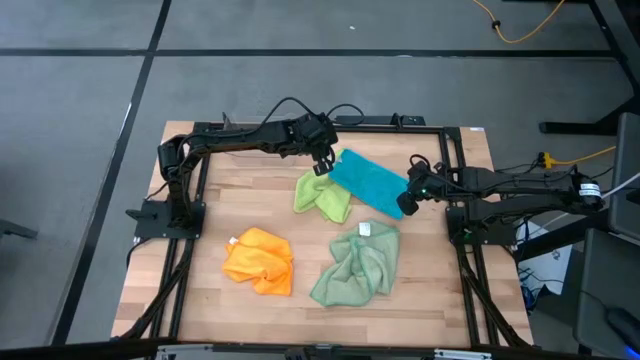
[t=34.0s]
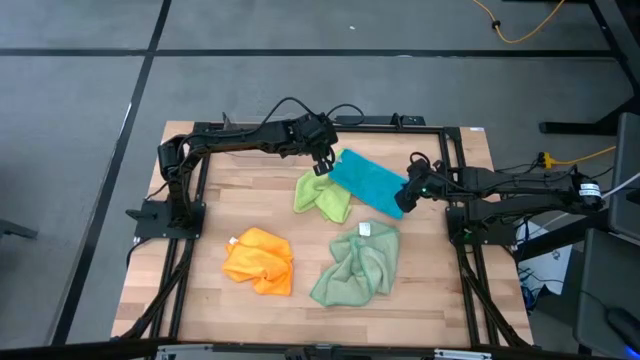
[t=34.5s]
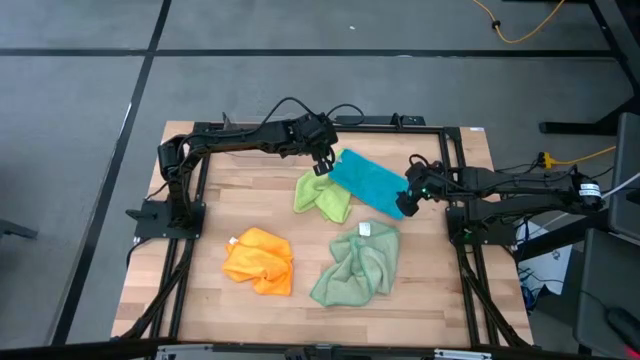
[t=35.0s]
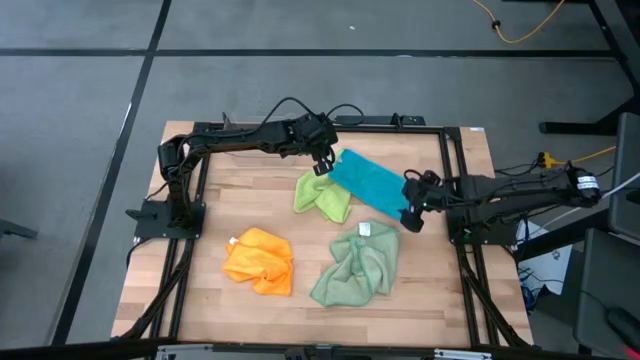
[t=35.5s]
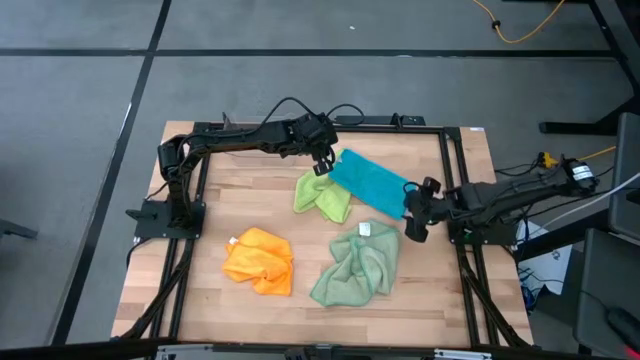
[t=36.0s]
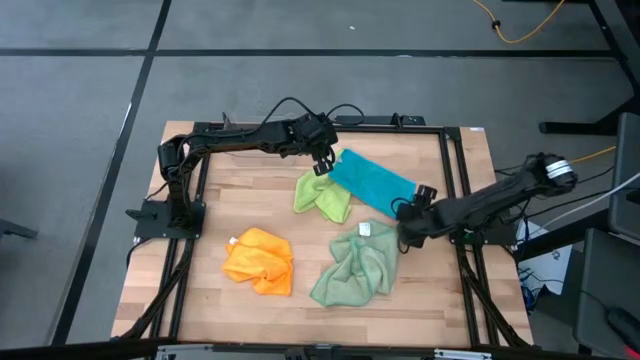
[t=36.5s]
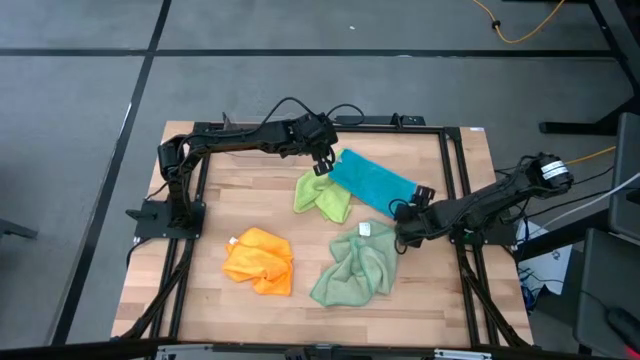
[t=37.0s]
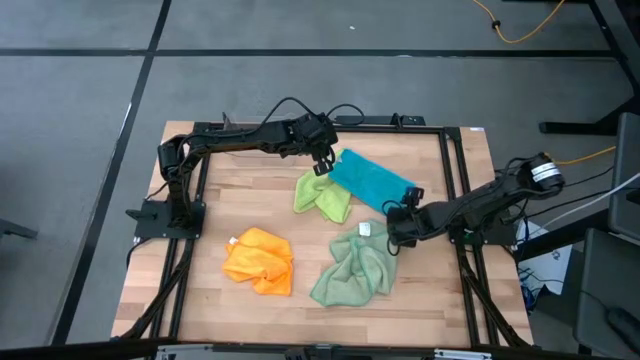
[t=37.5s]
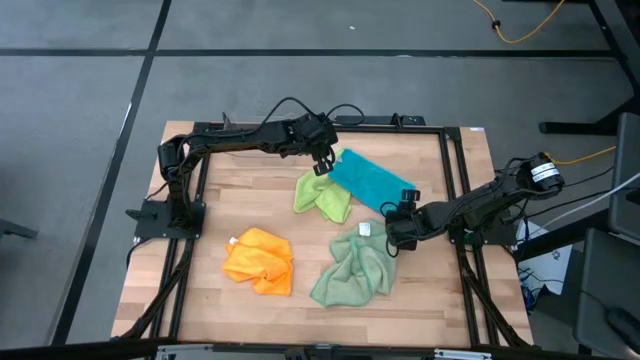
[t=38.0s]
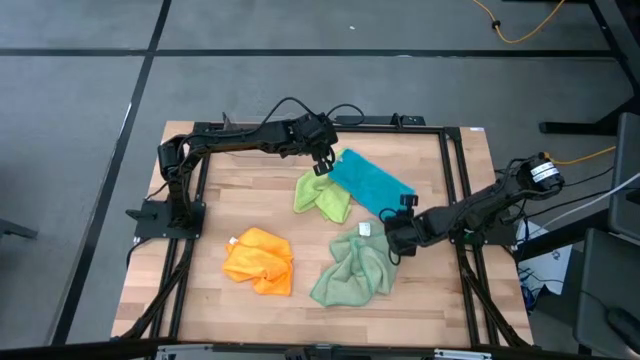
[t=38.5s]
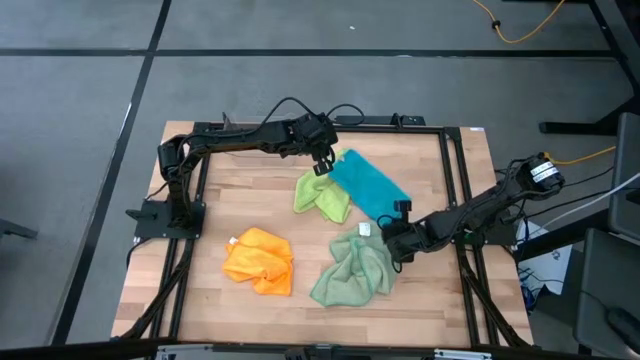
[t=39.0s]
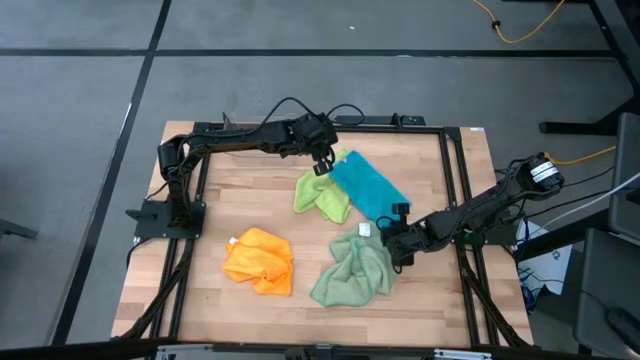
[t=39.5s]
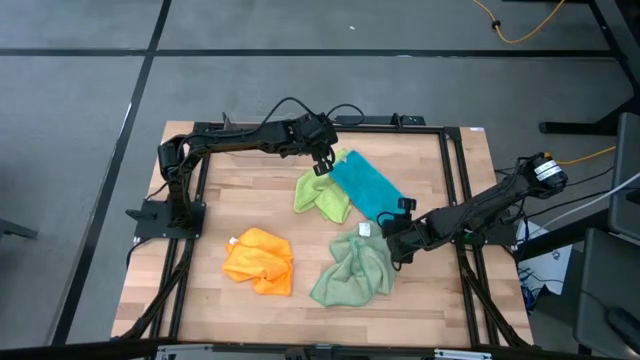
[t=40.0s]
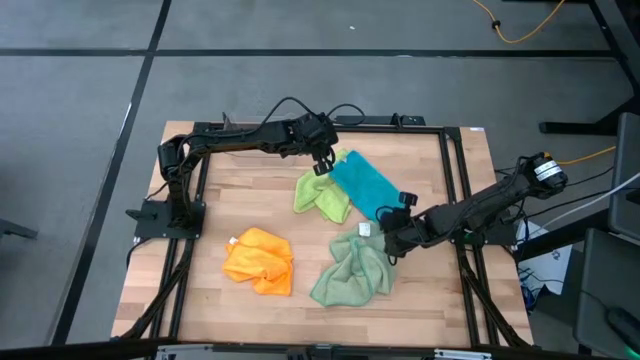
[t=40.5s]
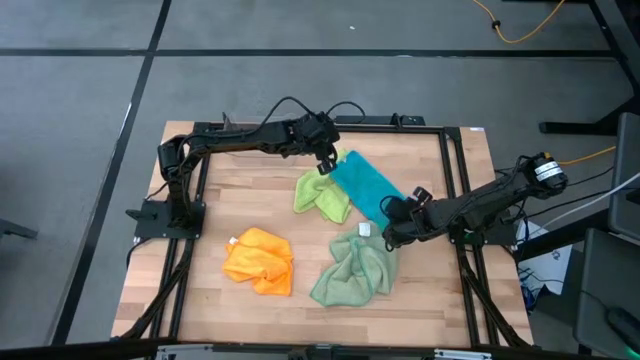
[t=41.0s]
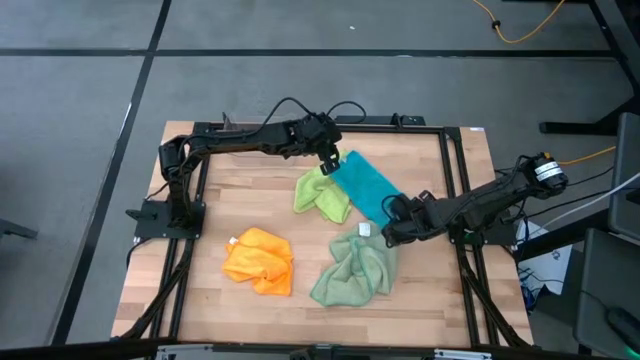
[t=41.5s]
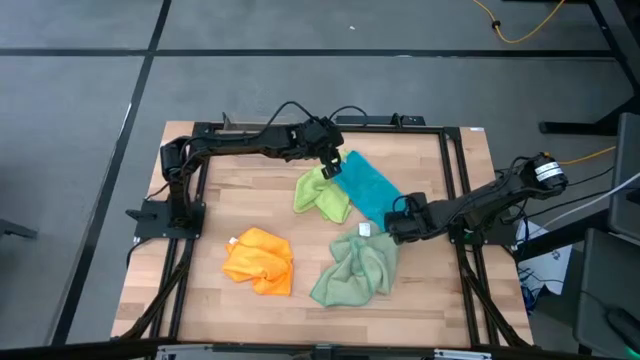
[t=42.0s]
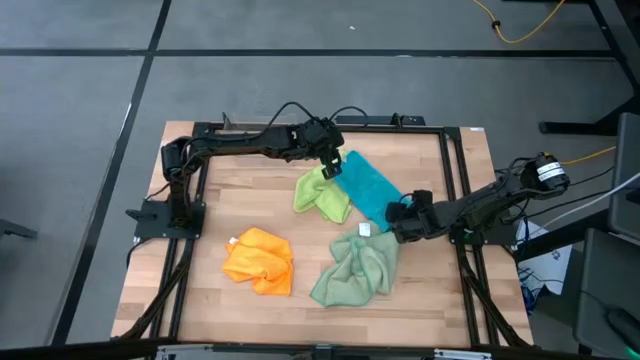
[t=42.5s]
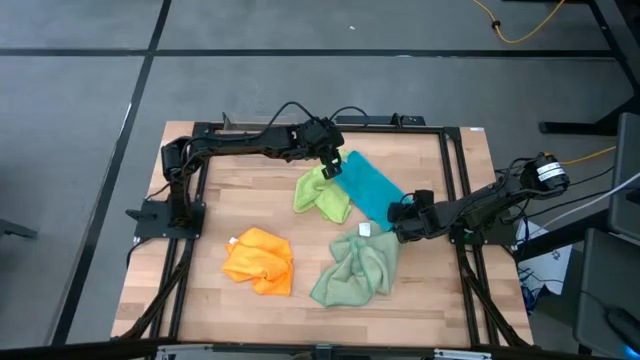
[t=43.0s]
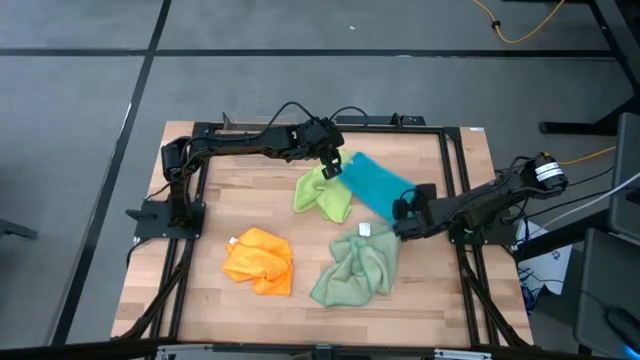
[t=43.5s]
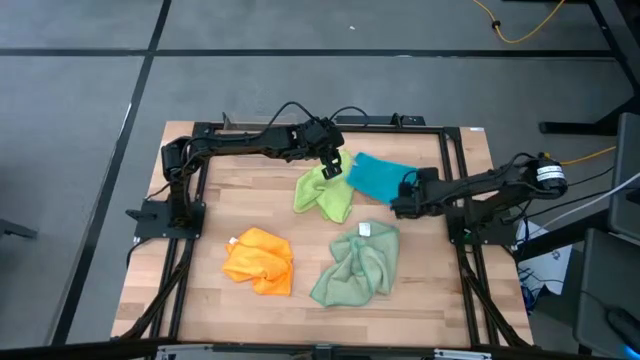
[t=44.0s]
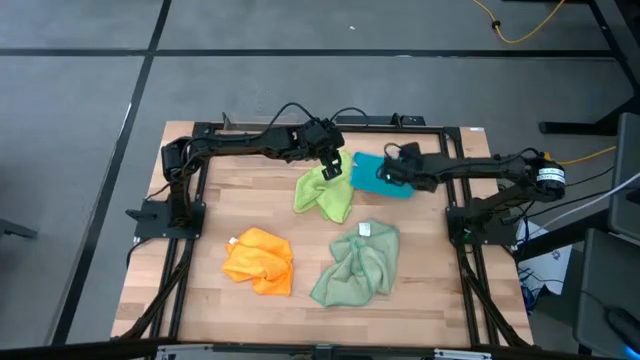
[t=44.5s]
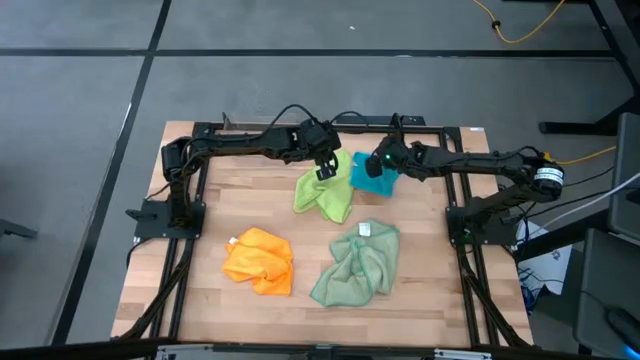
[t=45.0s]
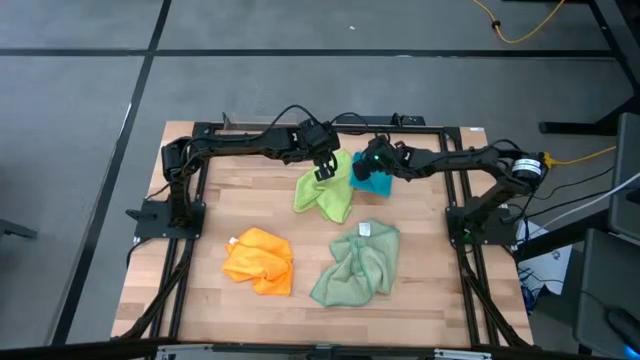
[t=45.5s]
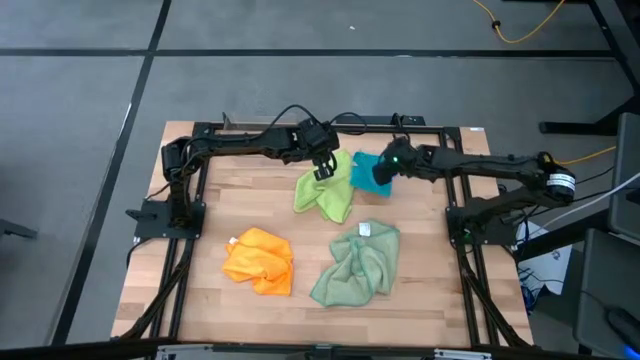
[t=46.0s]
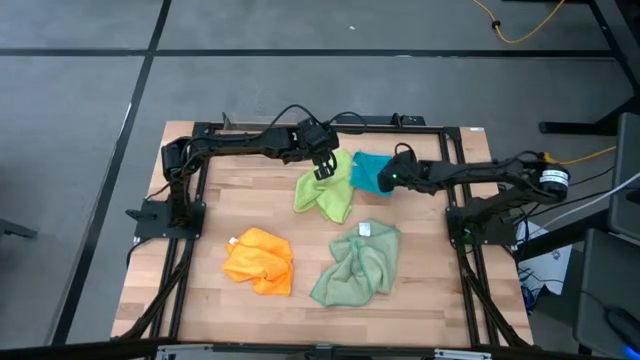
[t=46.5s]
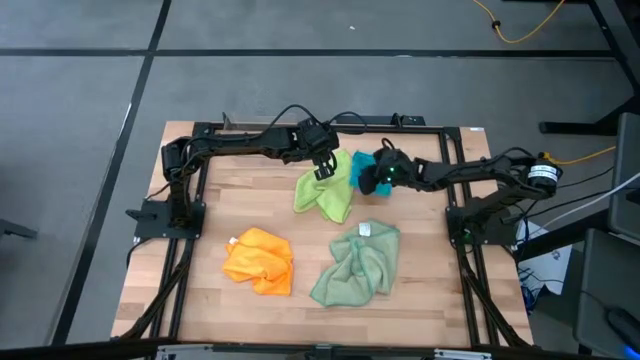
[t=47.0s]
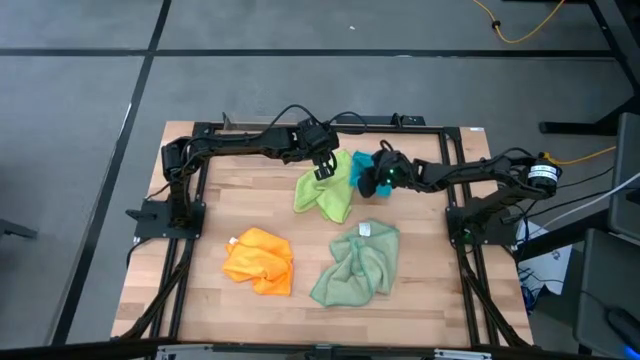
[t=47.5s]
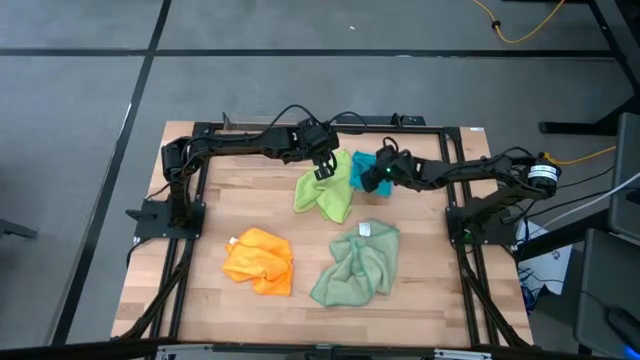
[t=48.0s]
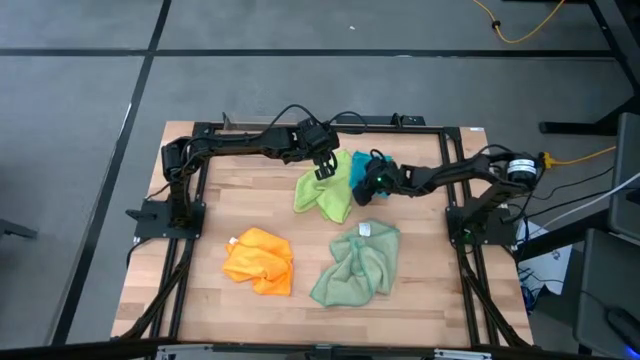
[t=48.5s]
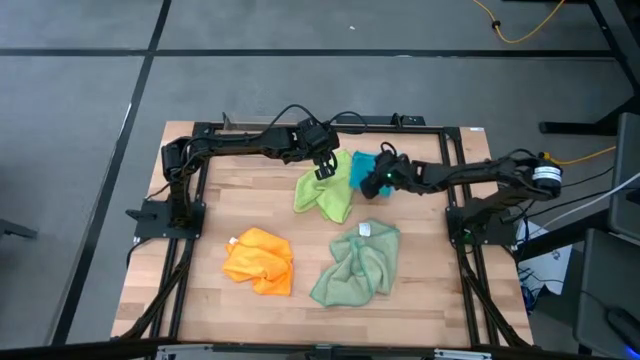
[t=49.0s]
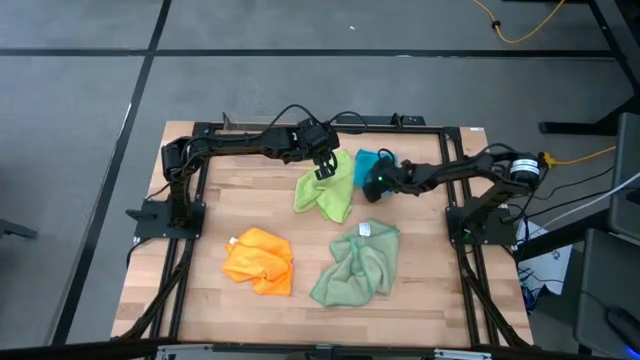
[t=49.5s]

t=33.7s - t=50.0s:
Task: Fold microfiber towels
Fold the blue towel

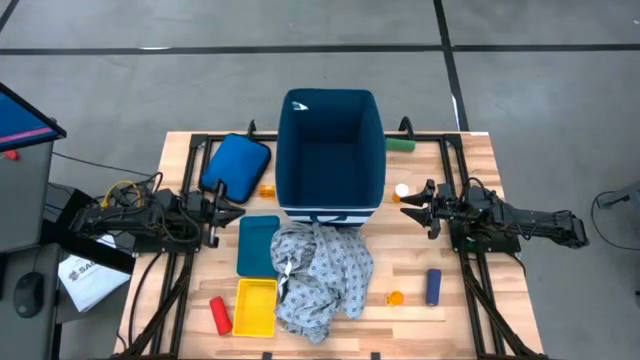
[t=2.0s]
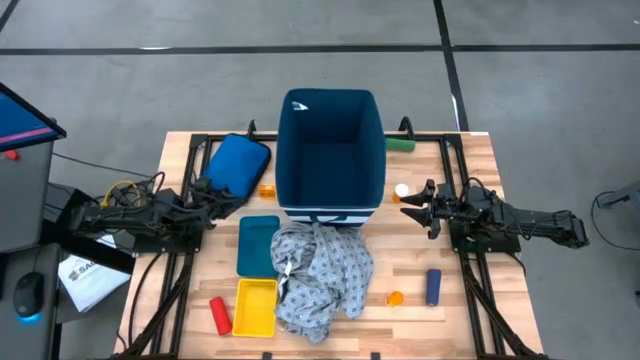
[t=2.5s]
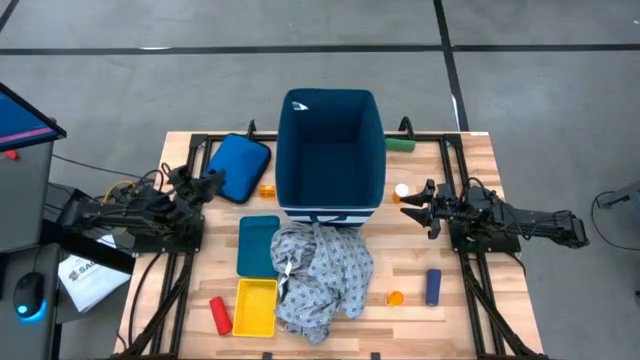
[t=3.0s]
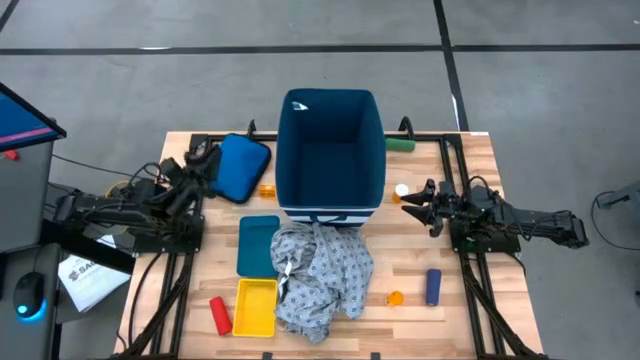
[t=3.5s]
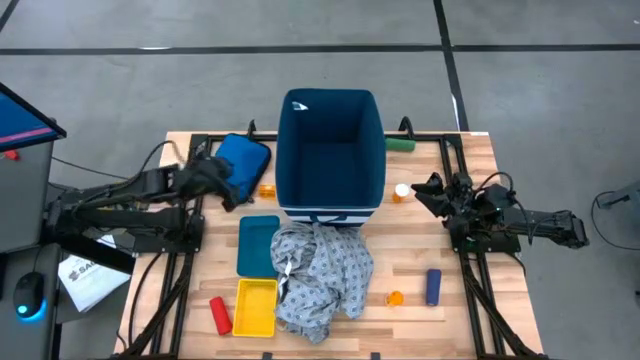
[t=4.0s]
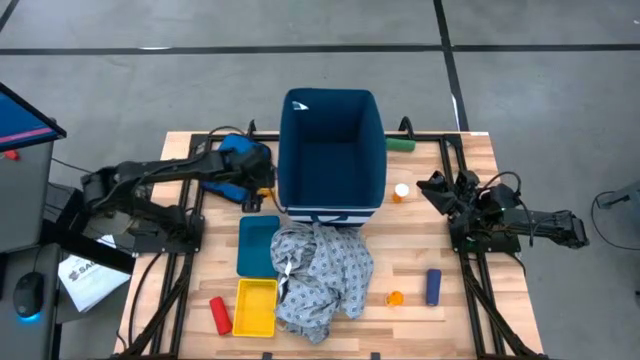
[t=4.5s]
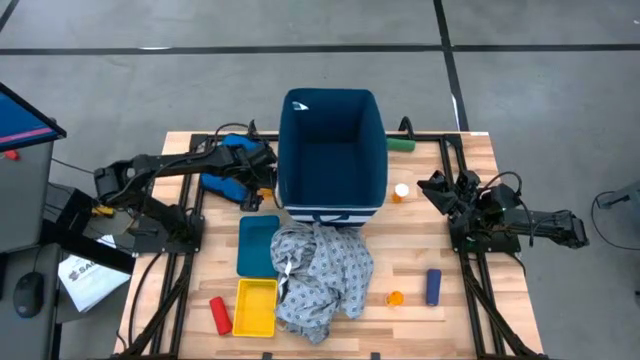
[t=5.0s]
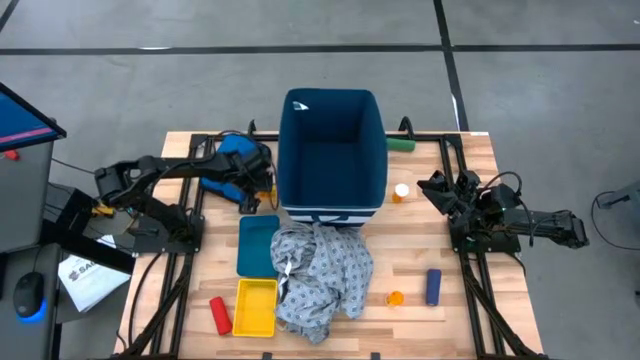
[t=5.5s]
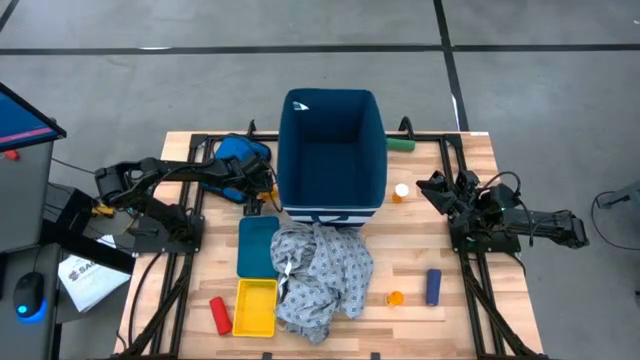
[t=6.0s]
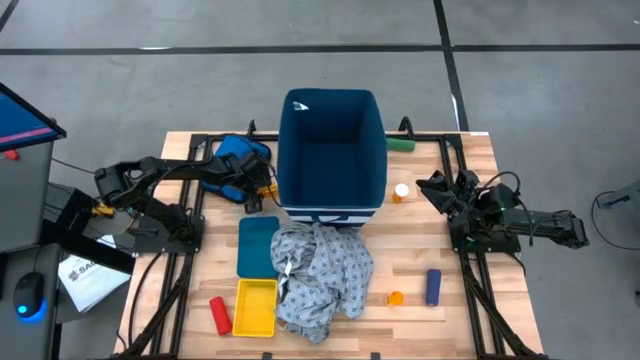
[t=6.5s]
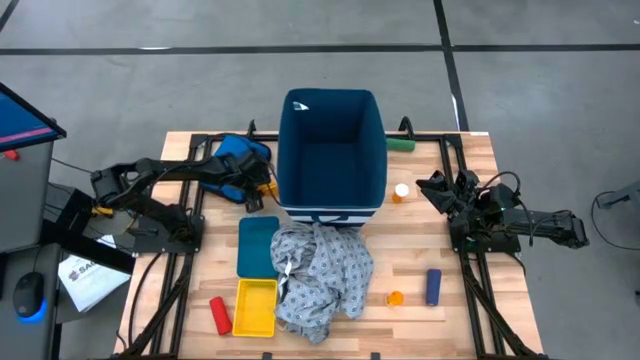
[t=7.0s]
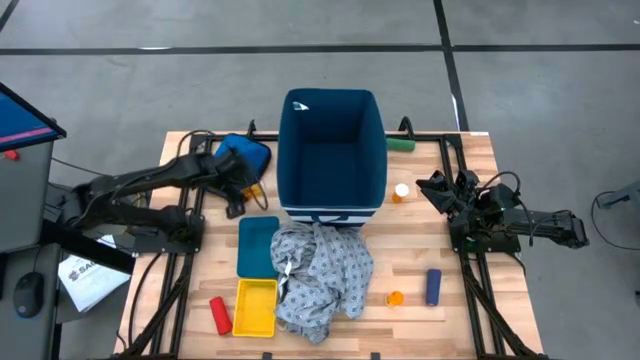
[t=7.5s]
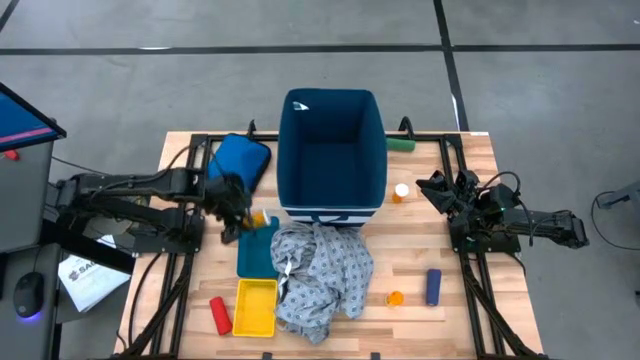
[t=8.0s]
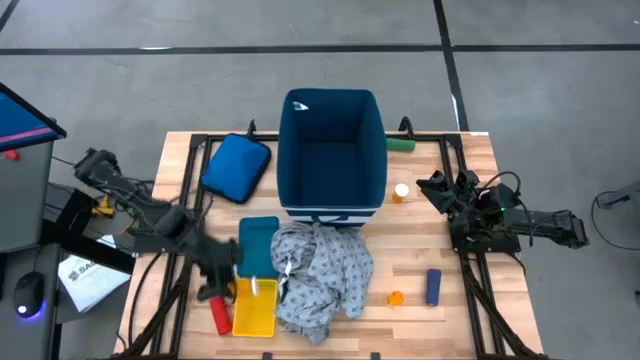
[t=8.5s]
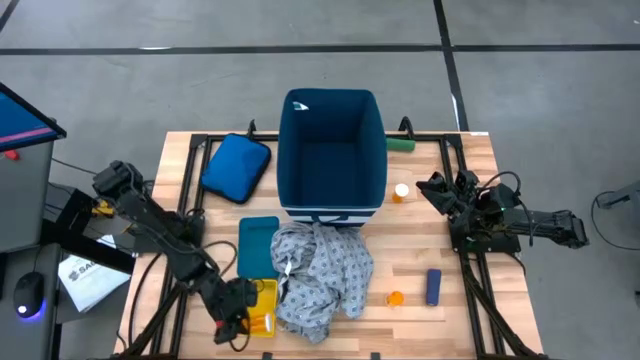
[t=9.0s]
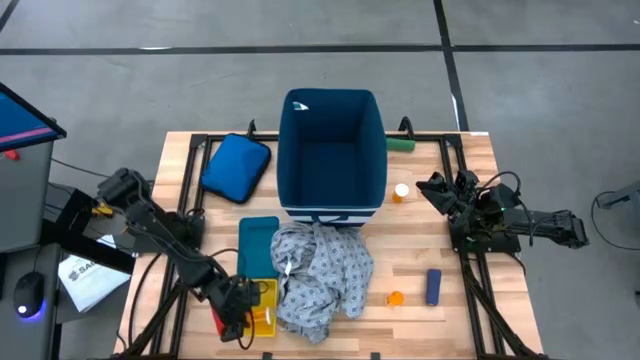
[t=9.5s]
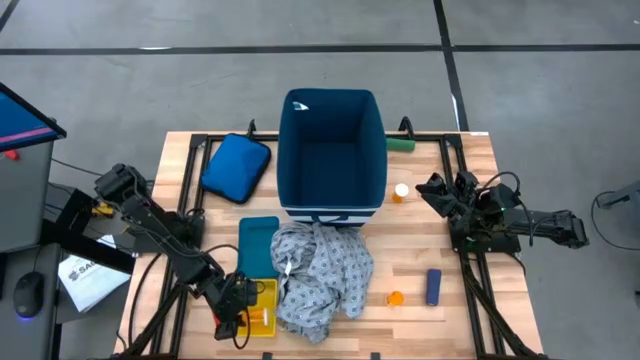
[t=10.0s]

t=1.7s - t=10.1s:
Task: Pick & place medical supplies in basket/bin
Put the top left orange pill bottle into the yellow bin
